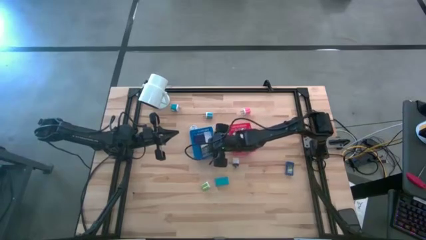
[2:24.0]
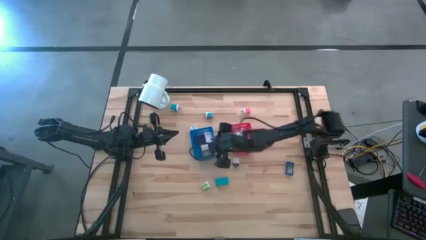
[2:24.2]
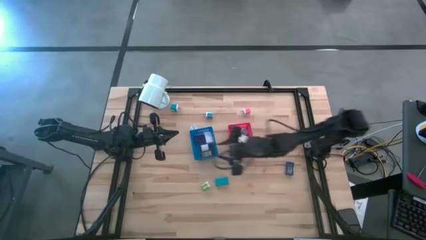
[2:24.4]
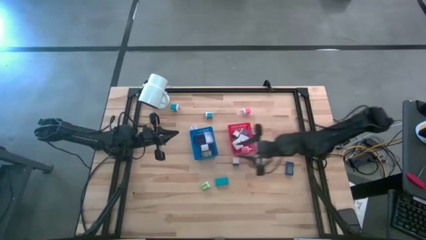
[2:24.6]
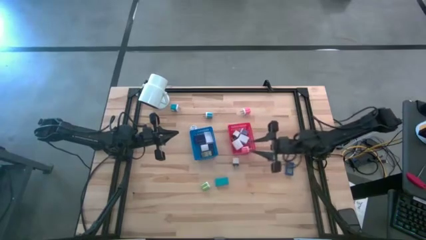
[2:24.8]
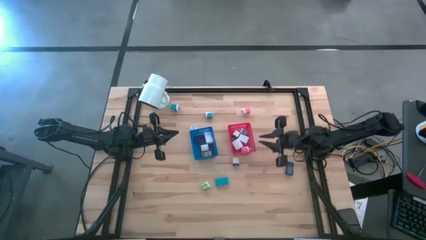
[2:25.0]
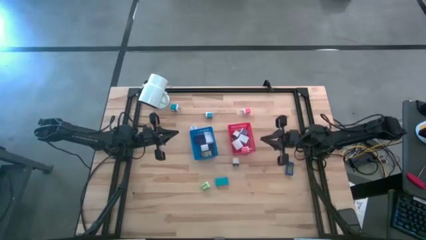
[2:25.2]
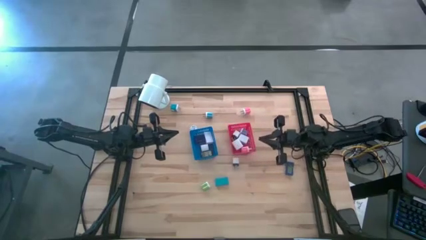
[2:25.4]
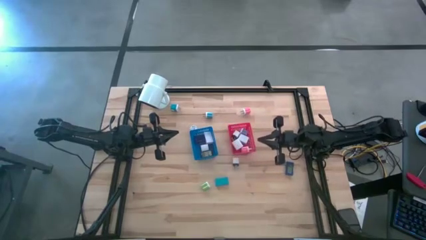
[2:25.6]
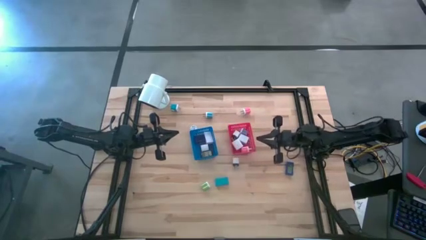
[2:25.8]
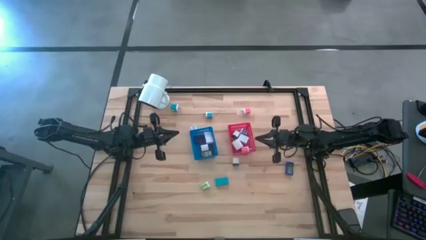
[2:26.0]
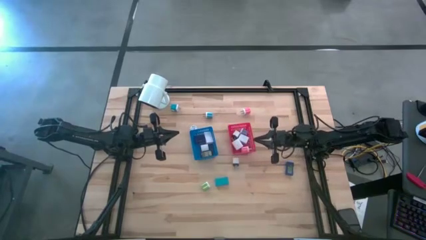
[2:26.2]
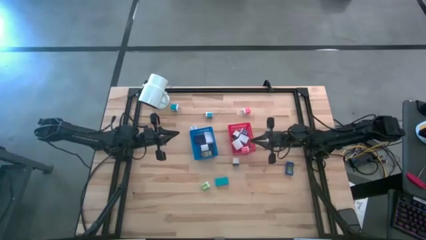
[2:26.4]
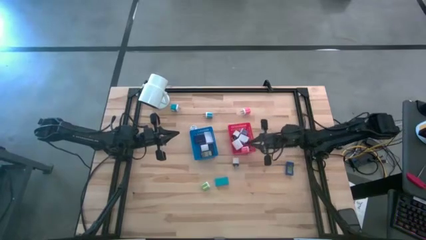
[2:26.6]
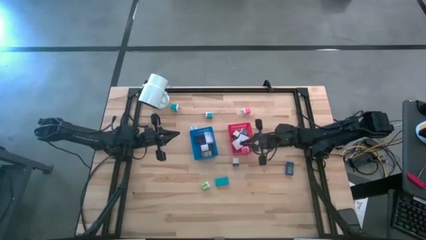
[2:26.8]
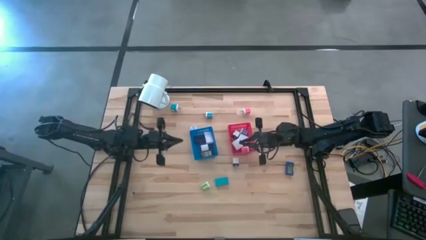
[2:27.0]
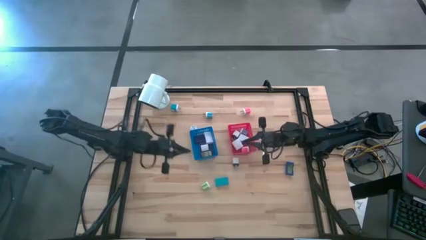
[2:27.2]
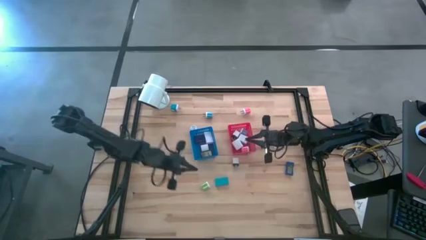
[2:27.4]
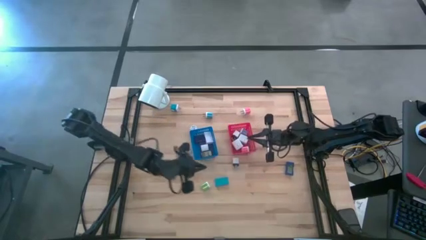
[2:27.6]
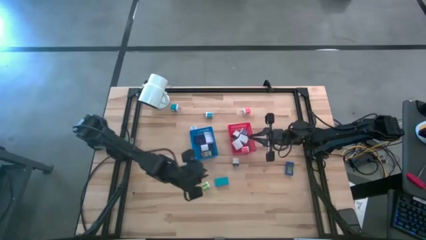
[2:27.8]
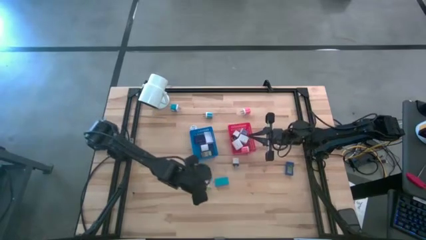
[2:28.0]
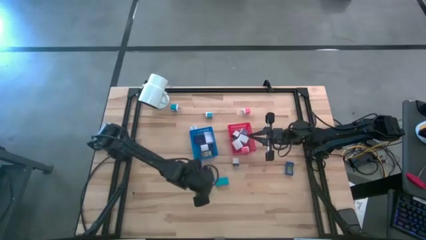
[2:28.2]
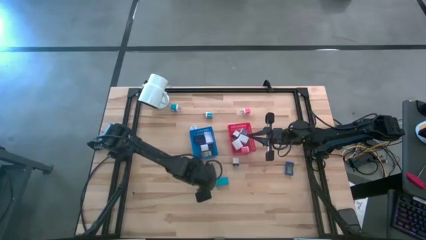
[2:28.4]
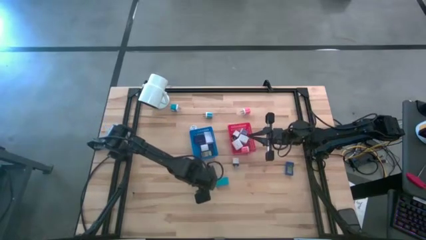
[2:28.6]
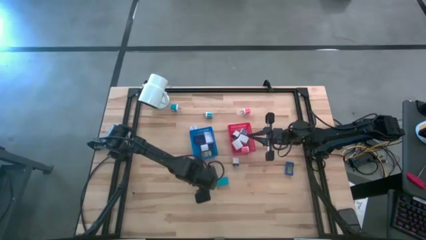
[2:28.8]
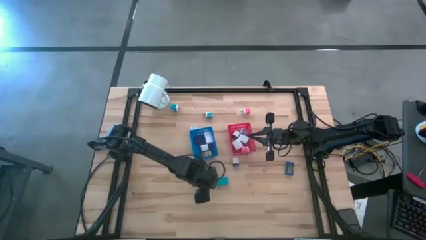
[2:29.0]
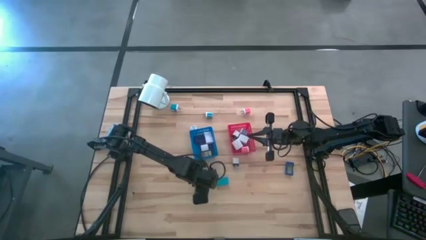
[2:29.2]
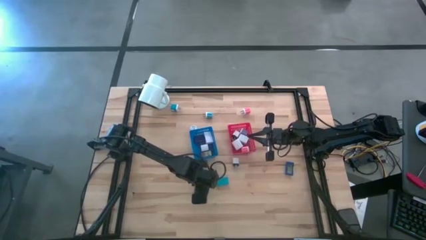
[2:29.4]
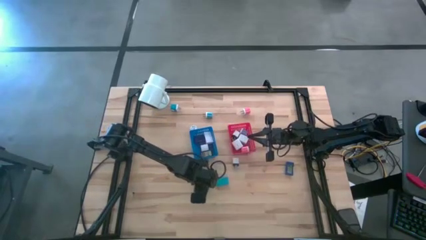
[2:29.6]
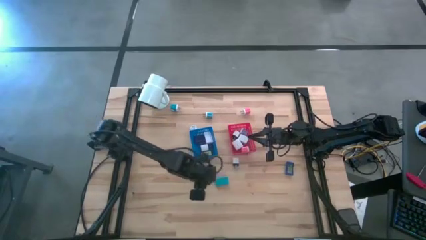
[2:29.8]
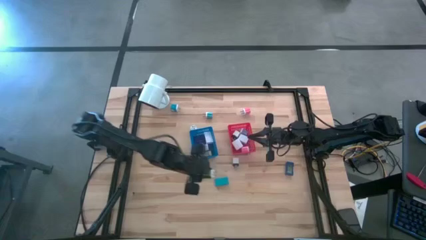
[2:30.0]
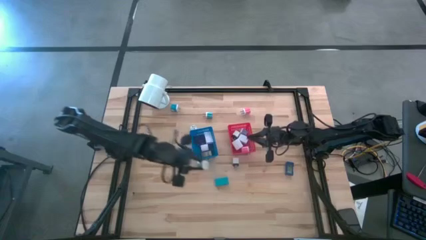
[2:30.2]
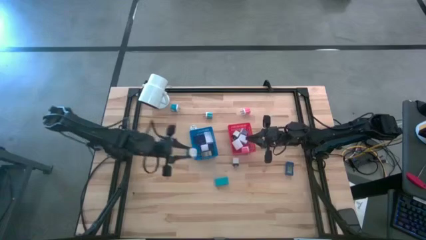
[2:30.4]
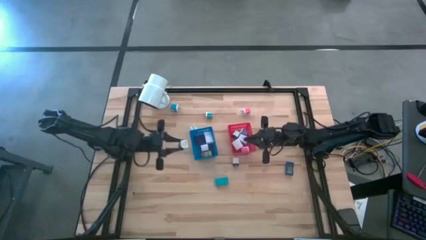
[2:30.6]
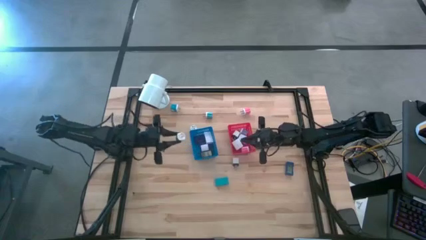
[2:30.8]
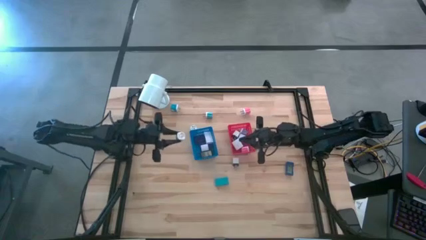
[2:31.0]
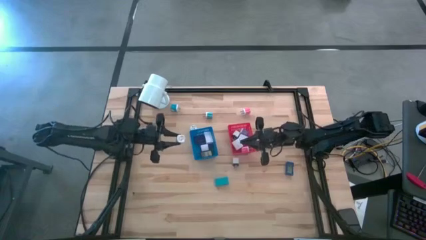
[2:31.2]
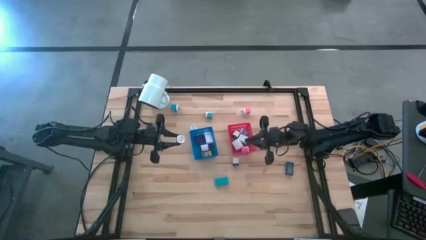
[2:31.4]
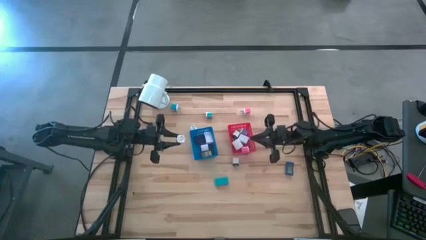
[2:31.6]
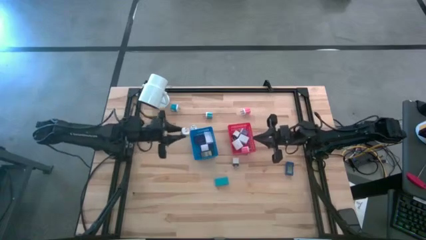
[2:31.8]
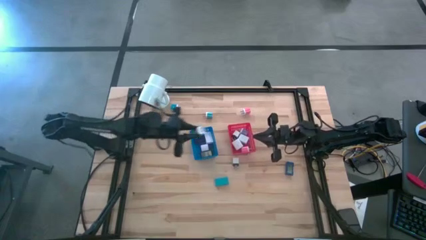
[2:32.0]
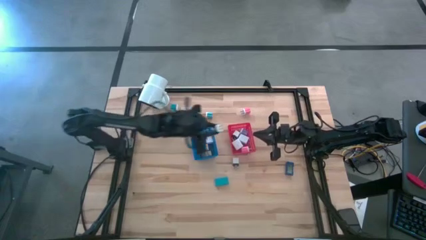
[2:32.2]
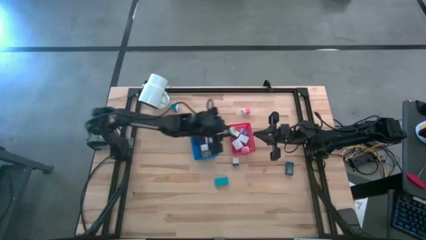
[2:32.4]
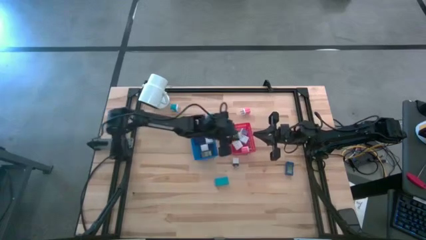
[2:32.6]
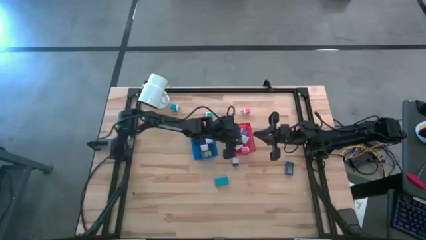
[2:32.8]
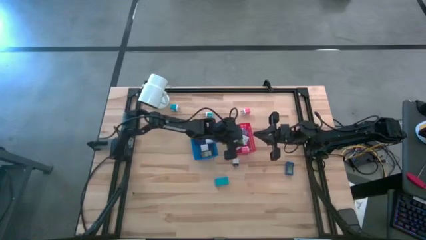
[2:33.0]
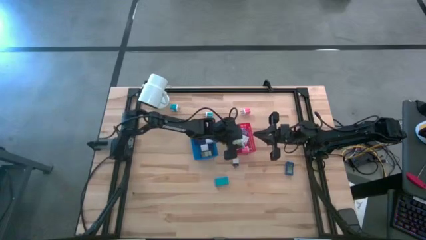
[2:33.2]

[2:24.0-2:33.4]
Task: Pick & Place Office items
Put the green charger adapter into the red bin
